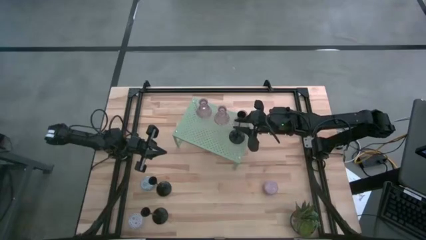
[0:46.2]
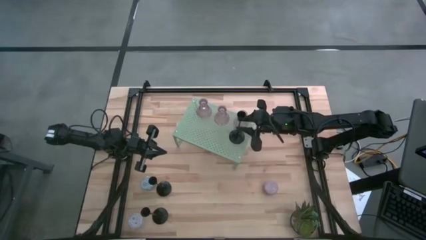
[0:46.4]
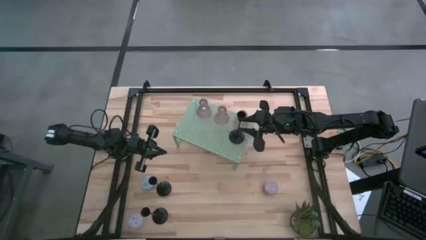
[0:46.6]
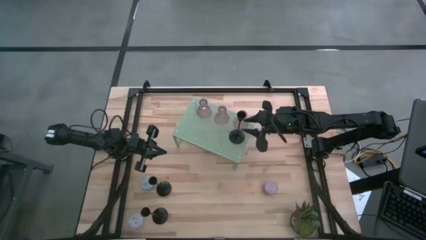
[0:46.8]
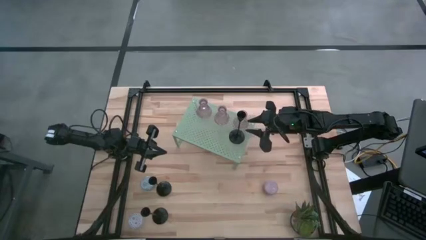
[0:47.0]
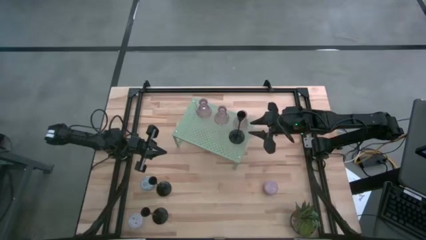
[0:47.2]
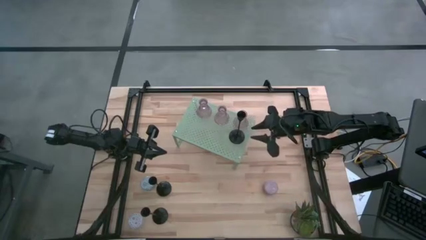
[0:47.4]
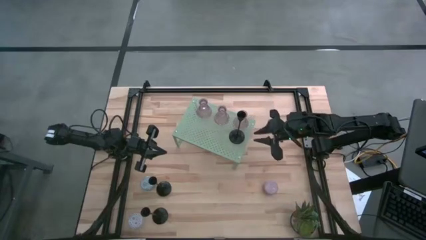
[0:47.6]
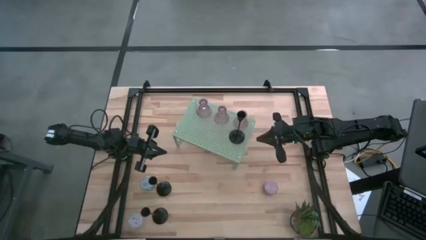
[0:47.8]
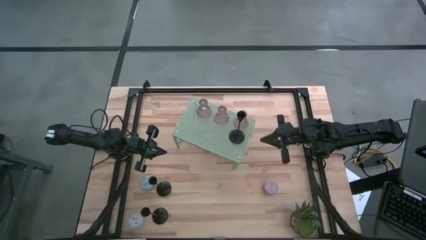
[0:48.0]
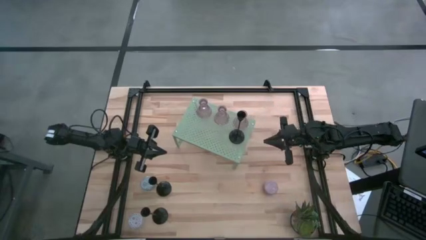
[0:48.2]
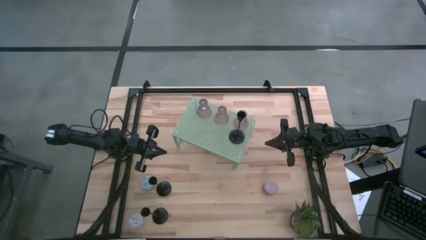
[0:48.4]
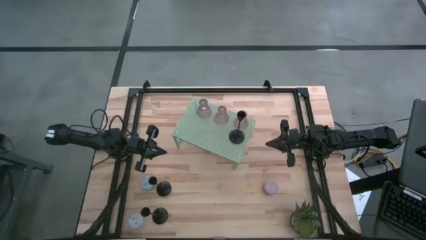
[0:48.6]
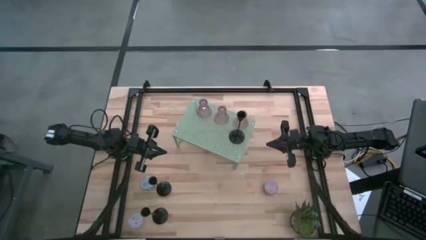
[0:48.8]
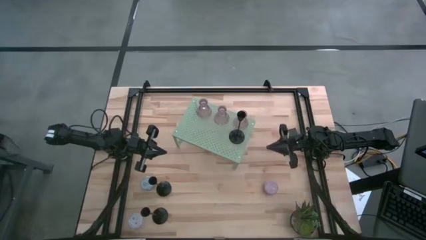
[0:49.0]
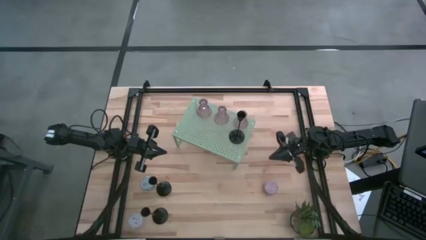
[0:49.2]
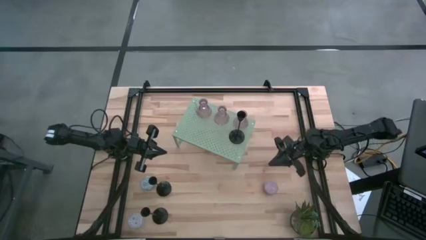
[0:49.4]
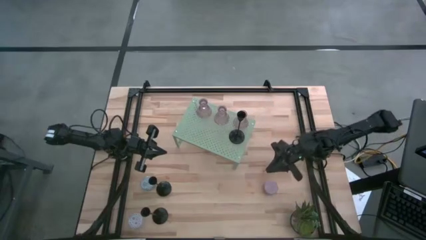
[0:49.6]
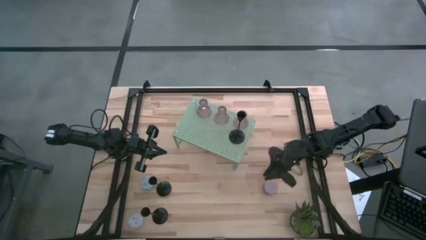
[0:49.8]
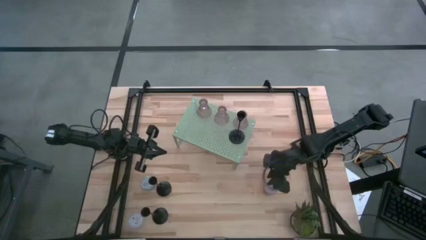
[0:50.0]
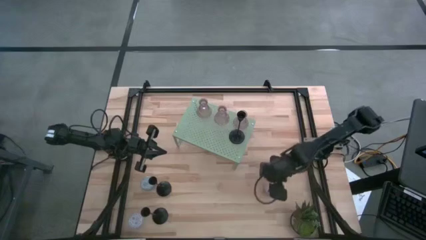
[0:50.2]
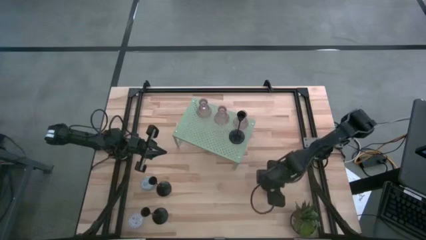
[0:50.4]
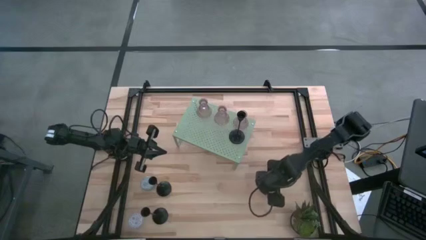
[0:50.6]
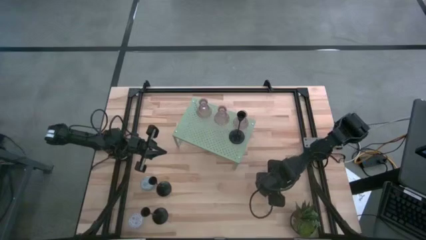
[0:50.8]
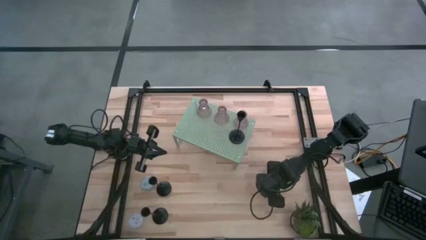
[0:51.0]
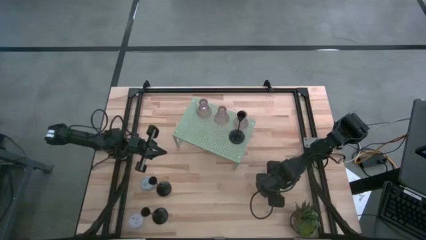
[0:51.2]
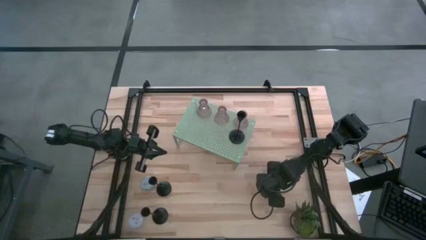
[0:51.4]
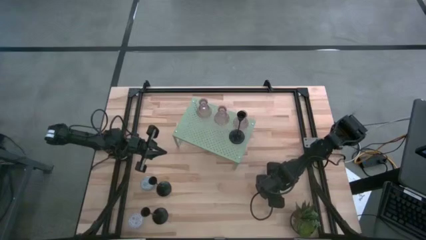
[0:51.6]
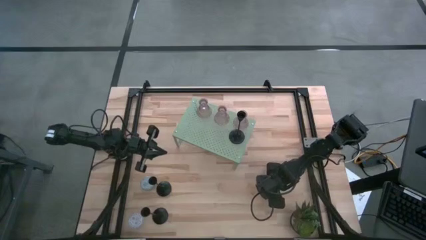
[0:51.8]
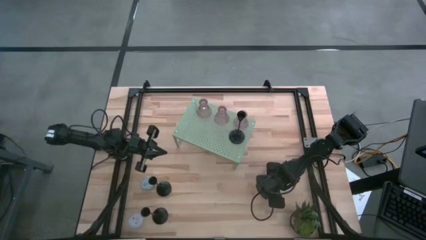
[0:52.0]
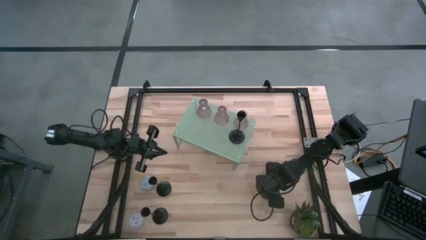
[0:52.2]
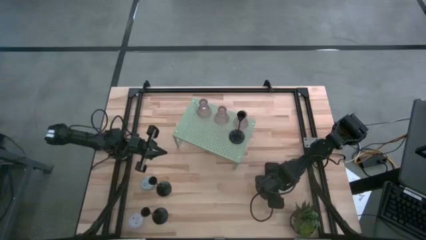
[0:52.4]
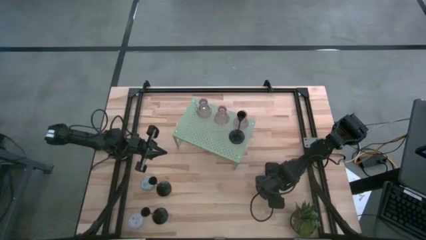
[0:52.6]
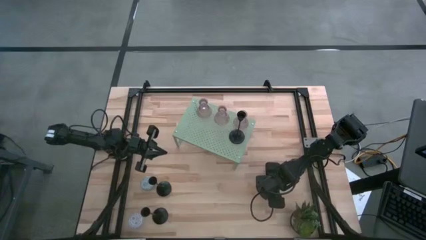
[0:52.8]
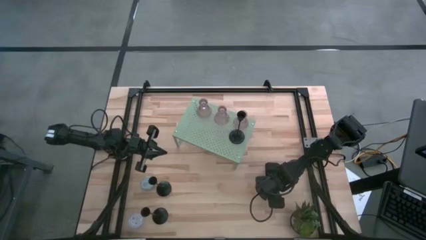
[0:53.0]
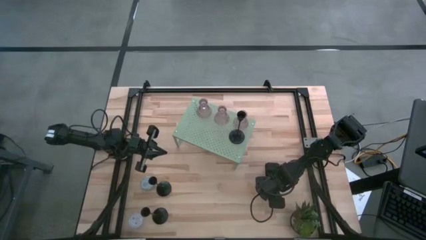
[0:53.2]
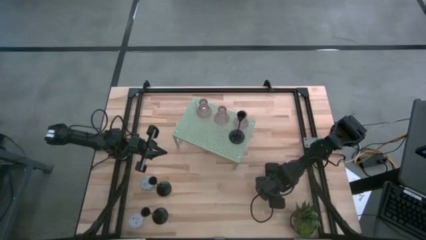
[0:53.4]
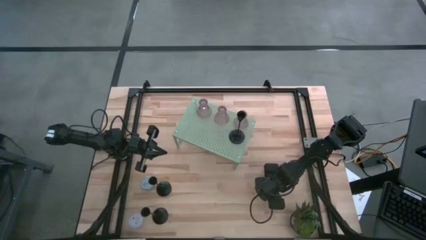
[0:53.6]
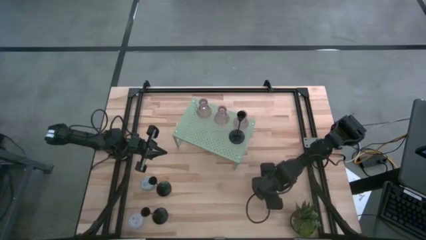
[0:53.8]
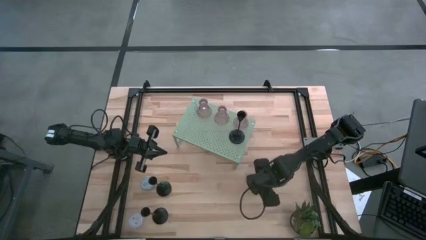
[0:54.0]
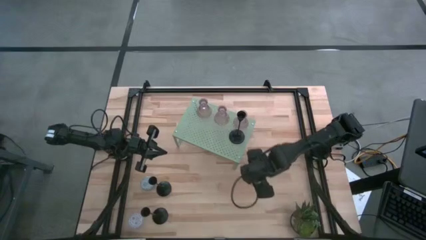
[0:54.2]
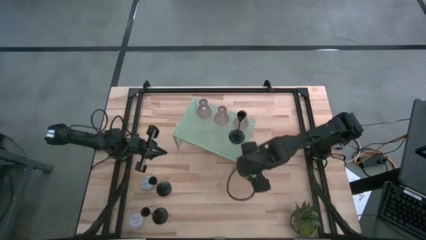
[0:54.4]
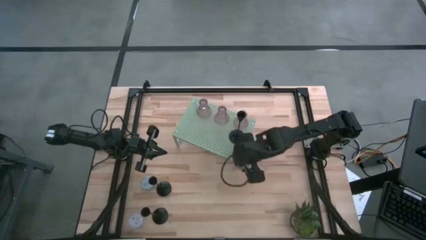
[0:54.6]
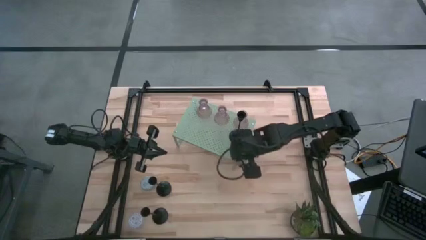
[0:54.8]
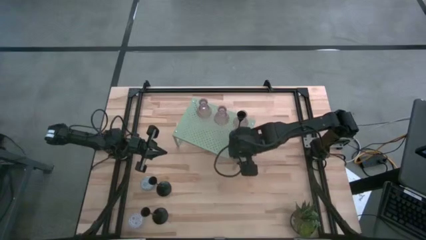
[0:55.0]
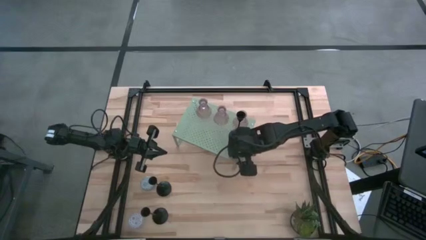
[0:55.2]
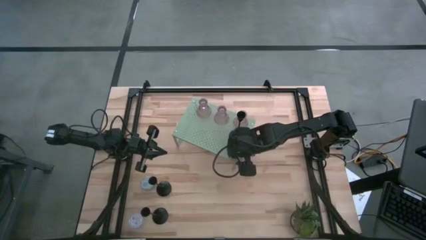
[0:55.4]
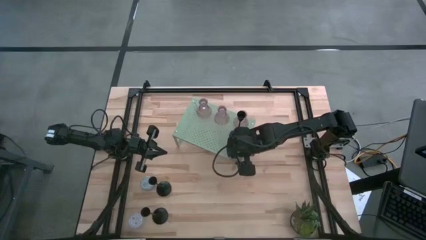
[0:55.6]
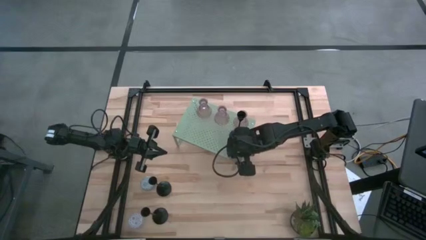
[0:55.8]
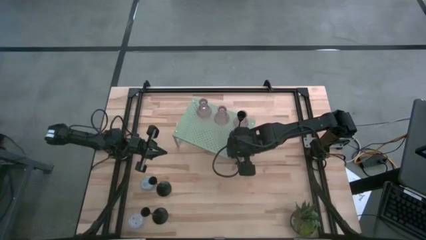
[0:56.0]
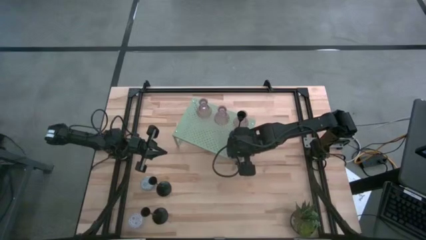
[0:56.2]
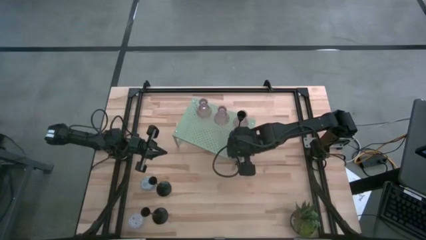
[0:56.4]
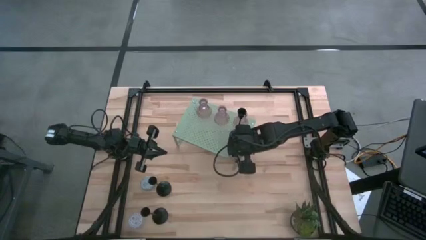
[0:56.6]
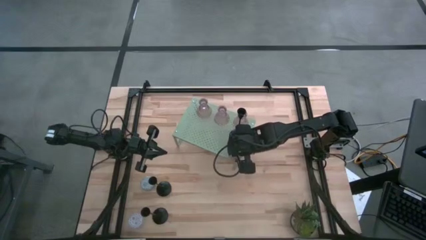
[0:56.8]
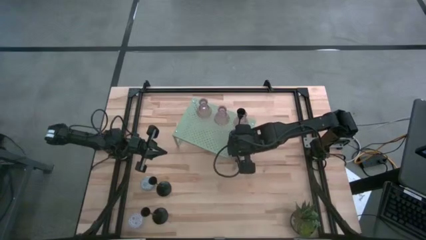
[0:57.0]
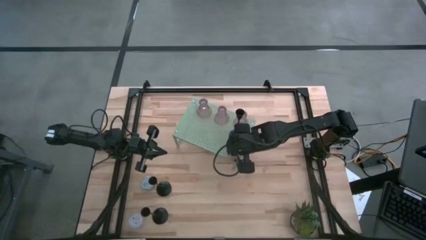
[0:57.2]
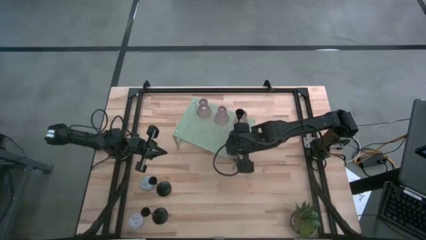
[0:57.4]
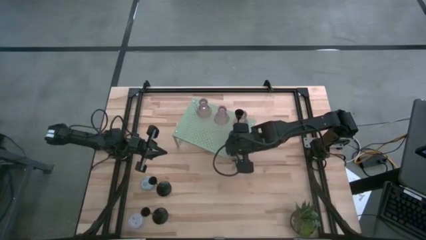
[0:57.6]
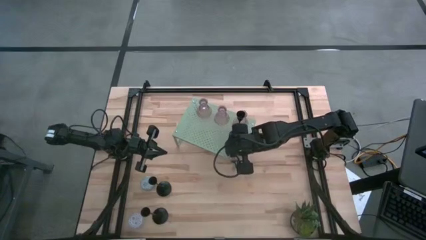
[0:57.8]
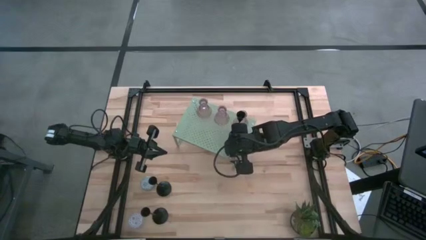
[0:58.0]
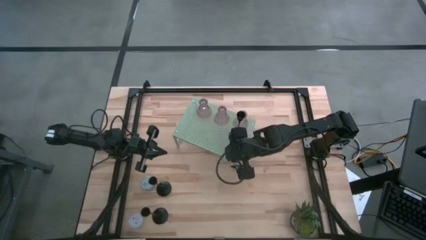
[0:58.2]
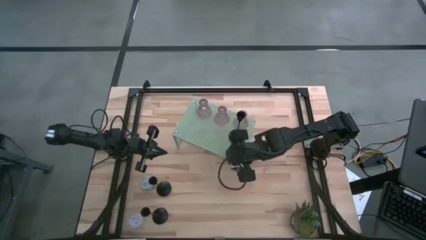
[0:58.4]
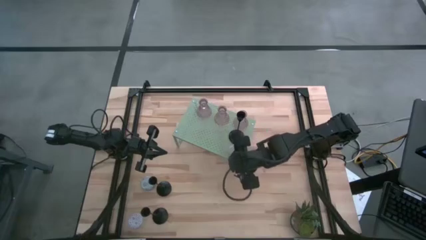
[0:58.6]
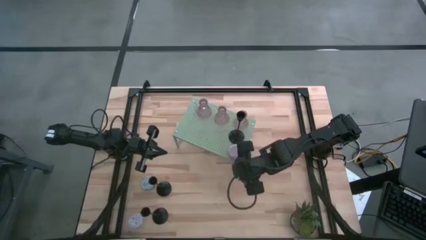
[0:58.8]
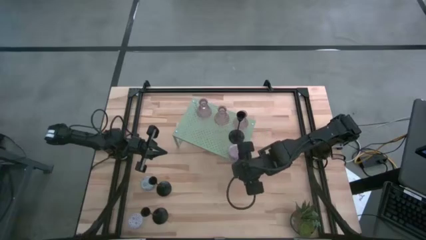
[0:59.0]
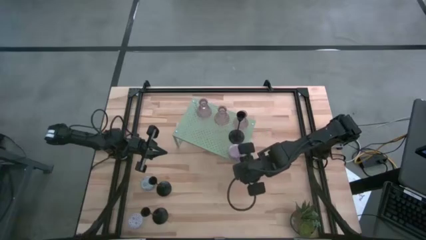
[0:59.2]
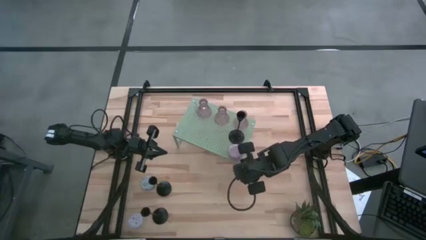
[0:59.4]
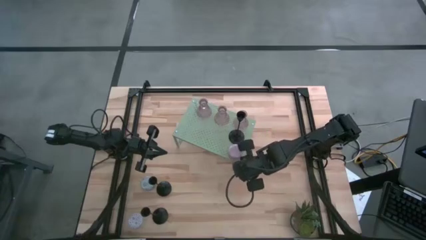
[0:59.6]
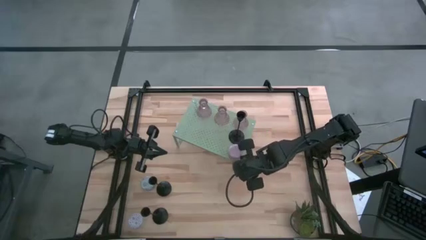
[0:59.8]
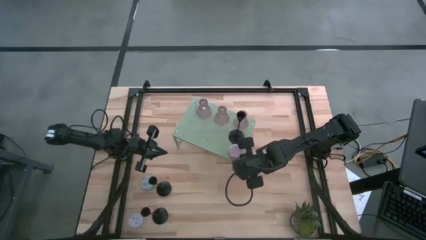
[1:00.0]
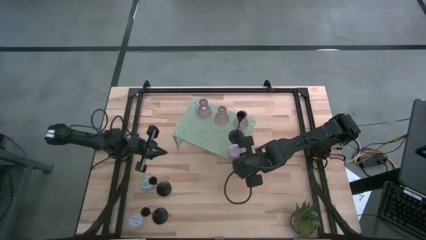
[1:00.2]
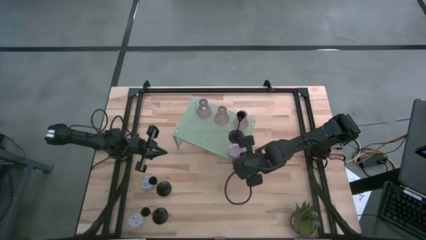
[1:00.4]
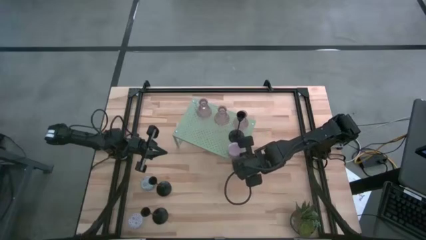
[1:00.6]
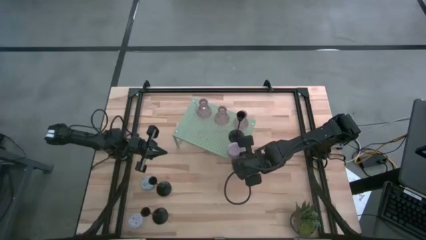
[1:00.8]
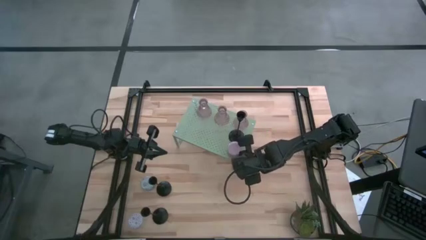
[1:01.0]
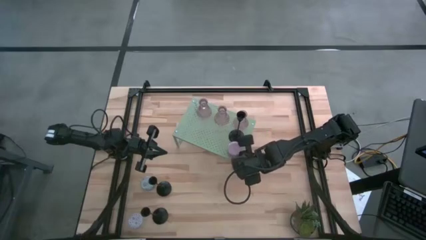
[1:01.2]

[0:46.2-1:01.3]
Task: Pick & Place candle stick holders
Put the purple patterned scented candle on the shelf
